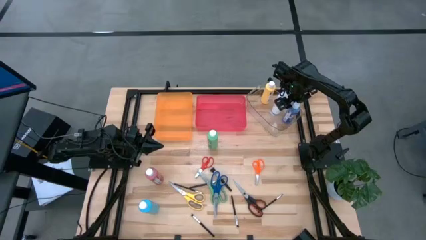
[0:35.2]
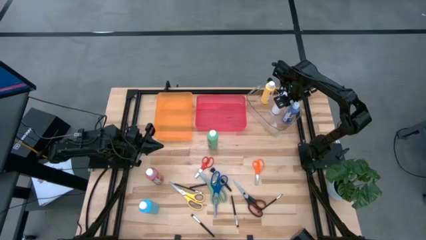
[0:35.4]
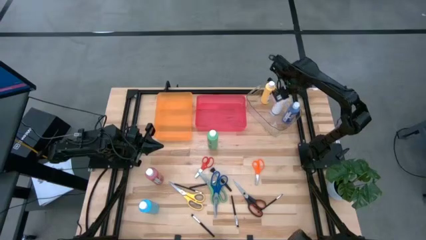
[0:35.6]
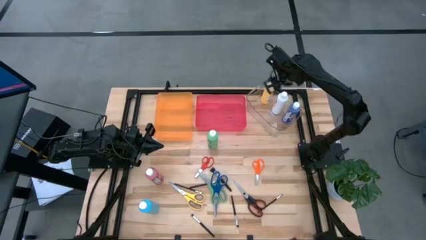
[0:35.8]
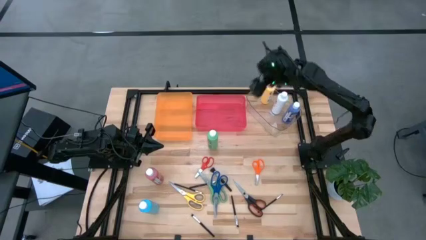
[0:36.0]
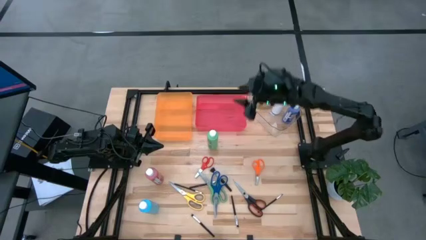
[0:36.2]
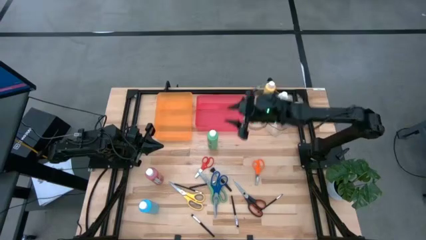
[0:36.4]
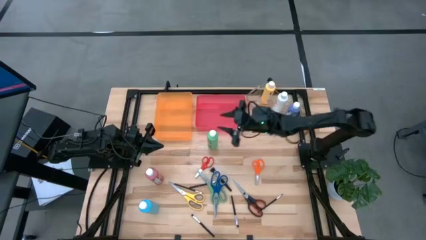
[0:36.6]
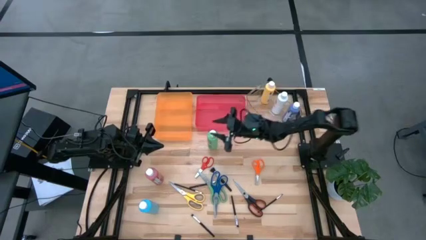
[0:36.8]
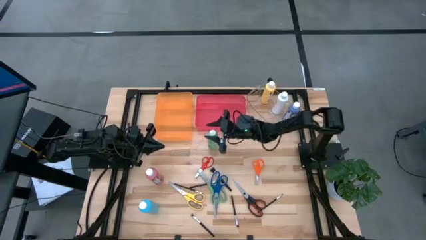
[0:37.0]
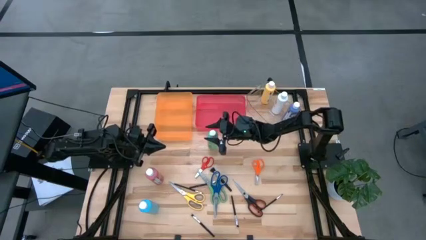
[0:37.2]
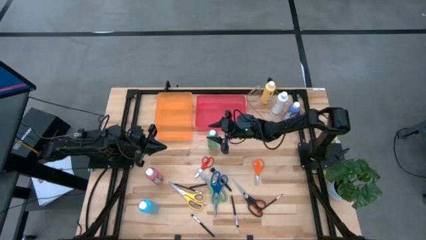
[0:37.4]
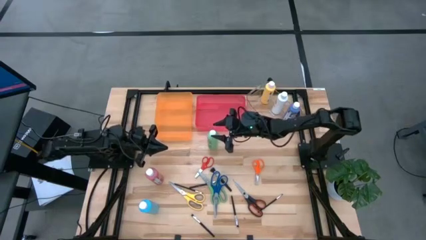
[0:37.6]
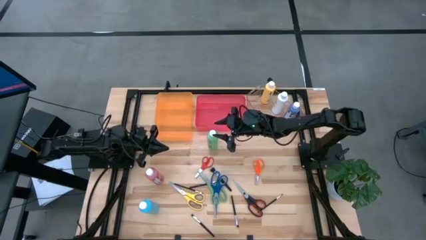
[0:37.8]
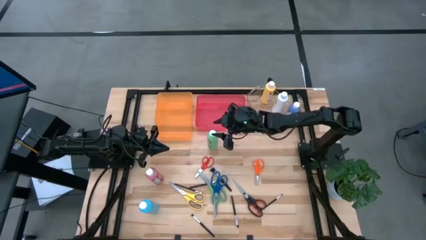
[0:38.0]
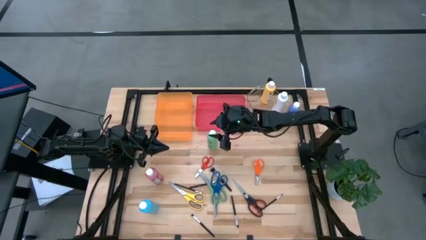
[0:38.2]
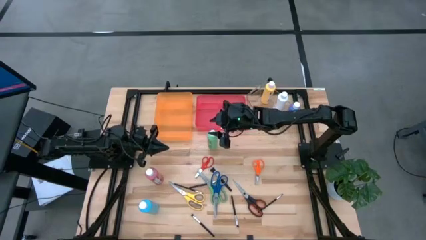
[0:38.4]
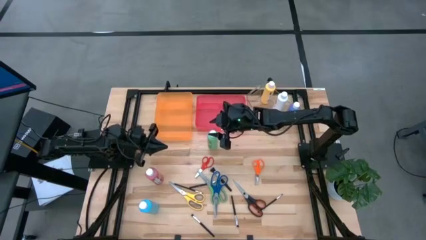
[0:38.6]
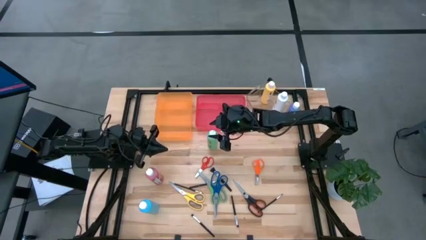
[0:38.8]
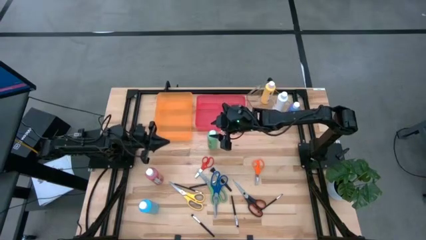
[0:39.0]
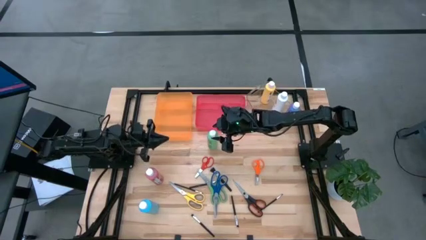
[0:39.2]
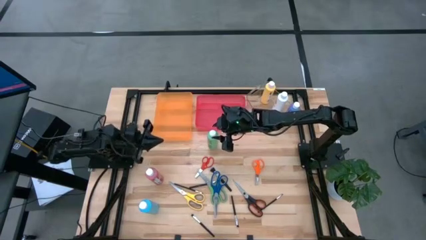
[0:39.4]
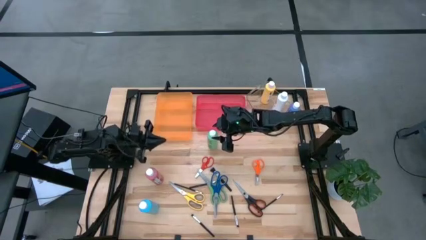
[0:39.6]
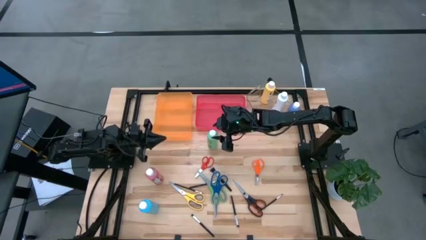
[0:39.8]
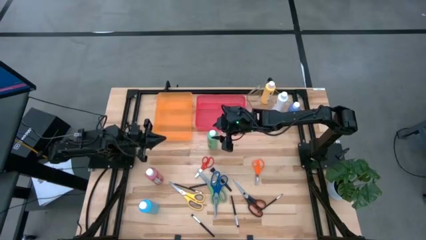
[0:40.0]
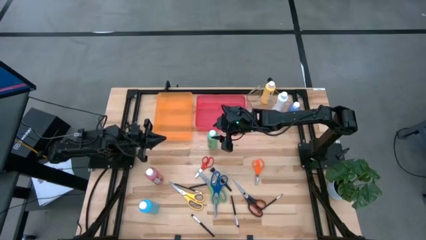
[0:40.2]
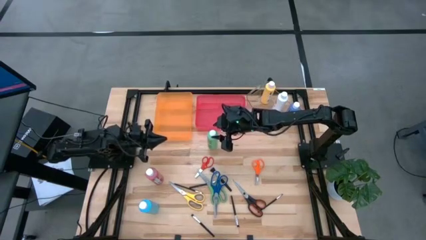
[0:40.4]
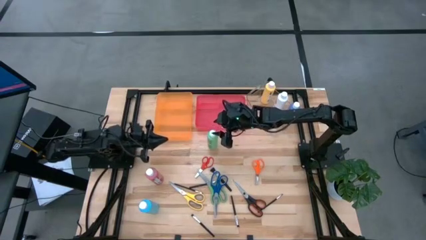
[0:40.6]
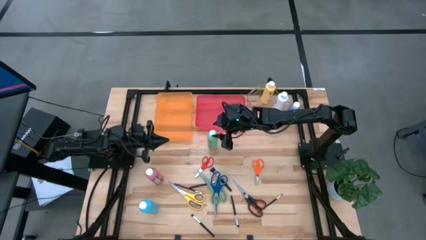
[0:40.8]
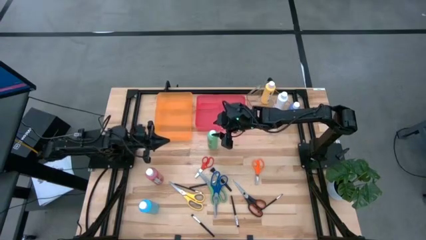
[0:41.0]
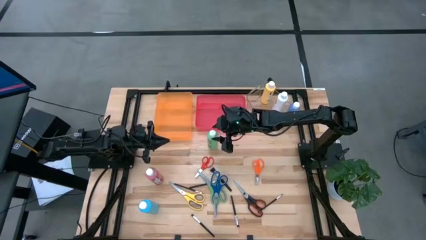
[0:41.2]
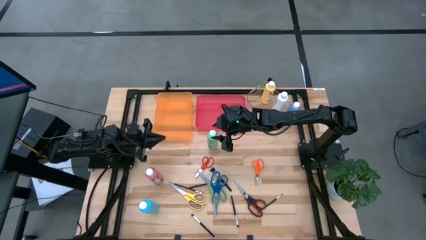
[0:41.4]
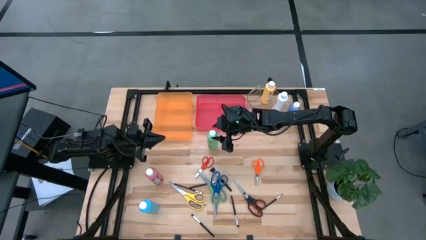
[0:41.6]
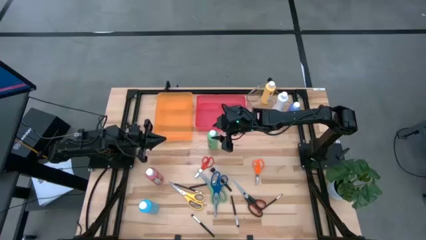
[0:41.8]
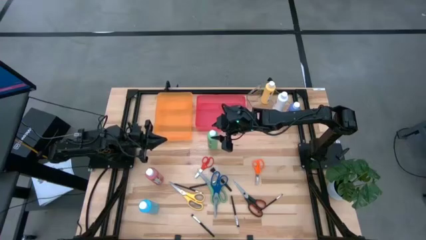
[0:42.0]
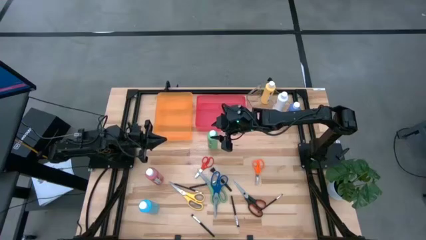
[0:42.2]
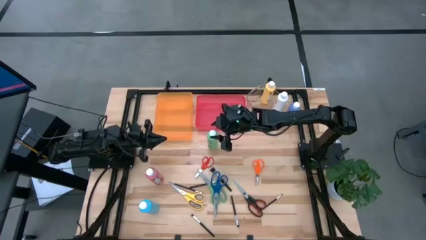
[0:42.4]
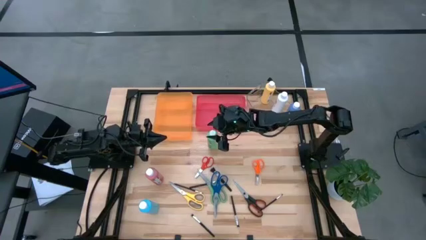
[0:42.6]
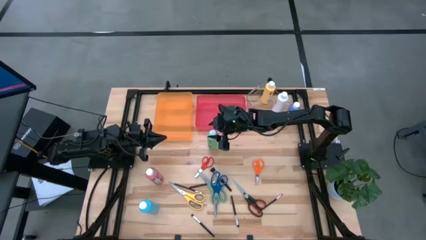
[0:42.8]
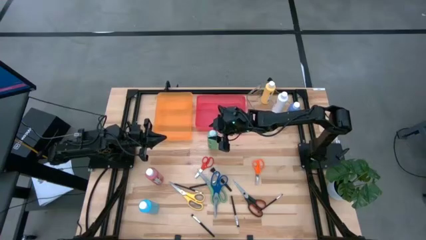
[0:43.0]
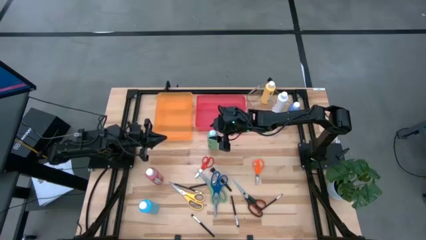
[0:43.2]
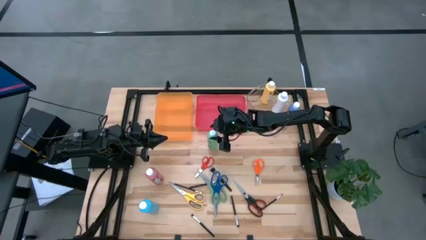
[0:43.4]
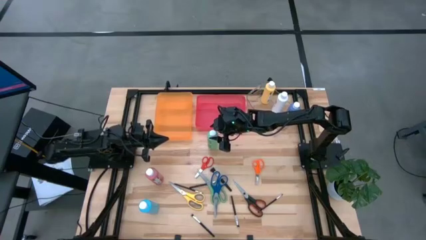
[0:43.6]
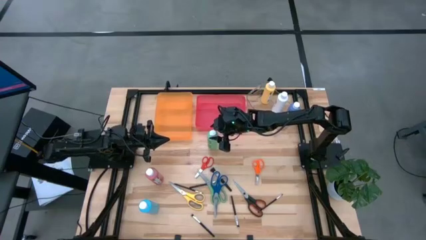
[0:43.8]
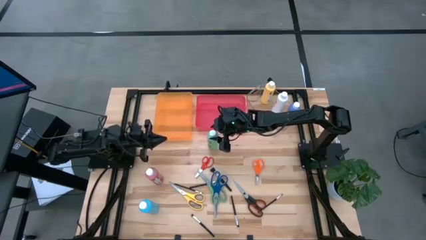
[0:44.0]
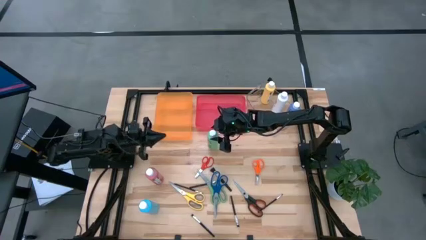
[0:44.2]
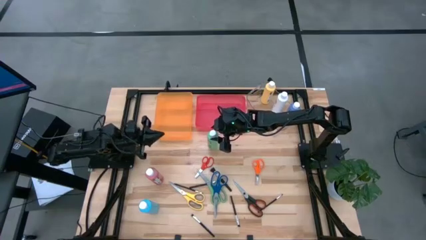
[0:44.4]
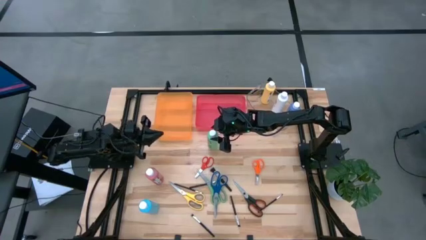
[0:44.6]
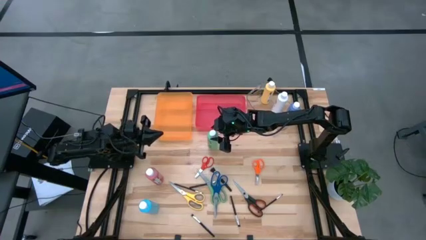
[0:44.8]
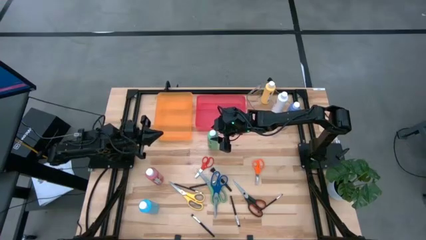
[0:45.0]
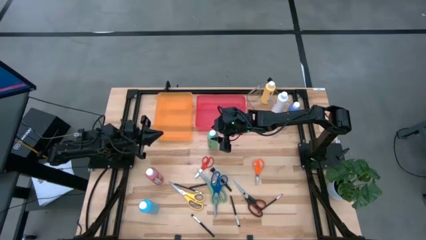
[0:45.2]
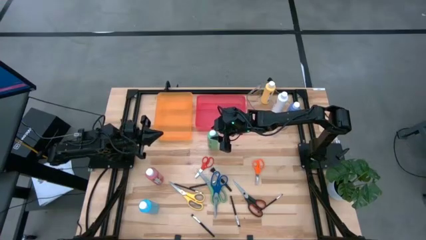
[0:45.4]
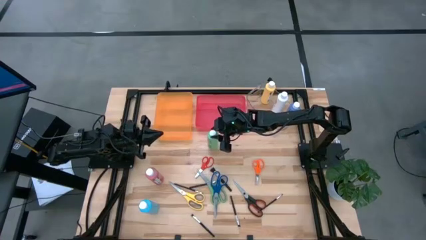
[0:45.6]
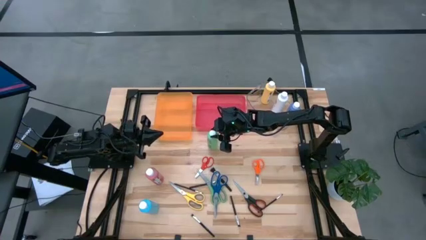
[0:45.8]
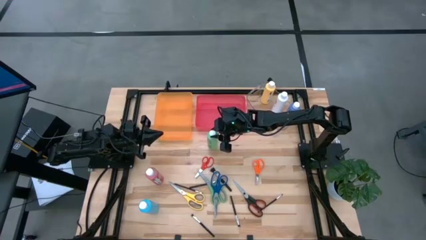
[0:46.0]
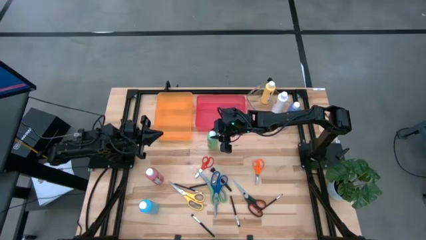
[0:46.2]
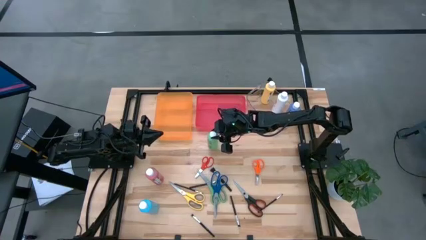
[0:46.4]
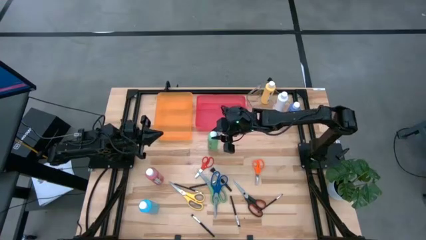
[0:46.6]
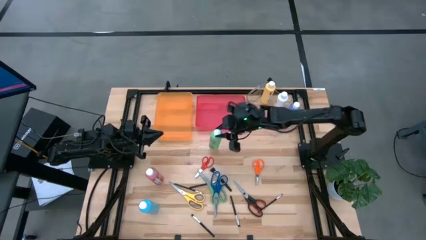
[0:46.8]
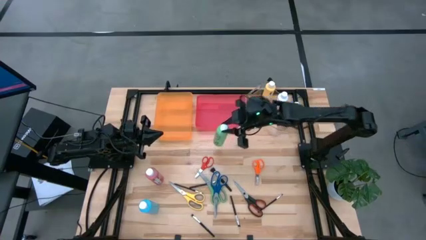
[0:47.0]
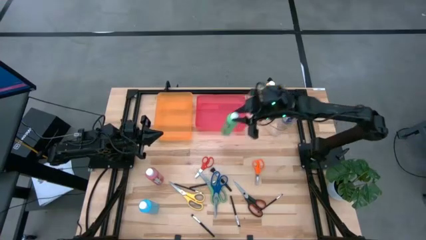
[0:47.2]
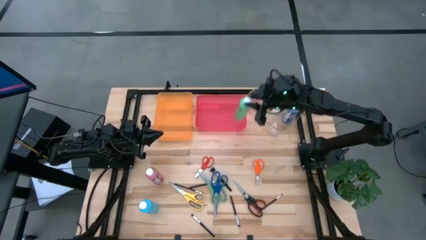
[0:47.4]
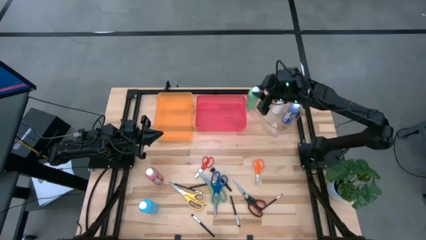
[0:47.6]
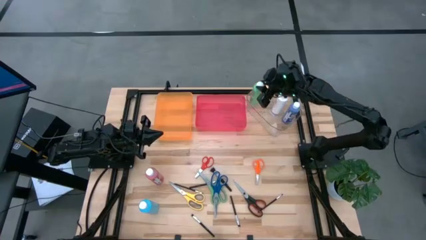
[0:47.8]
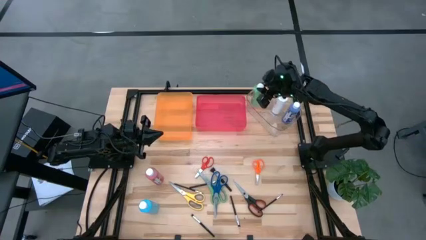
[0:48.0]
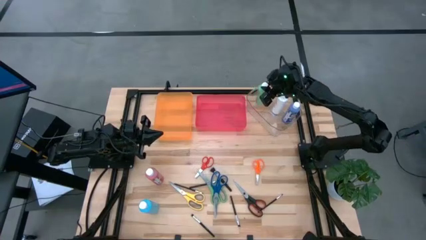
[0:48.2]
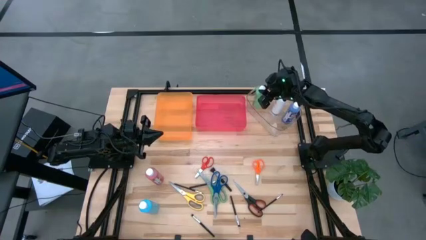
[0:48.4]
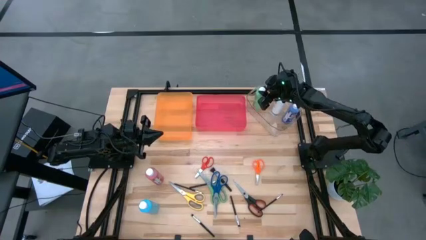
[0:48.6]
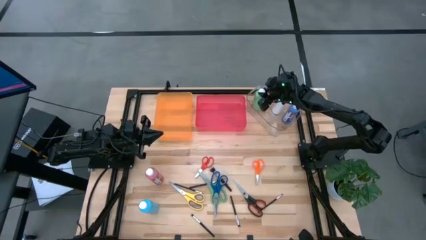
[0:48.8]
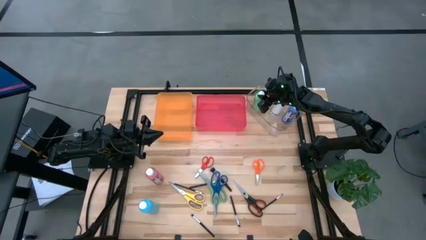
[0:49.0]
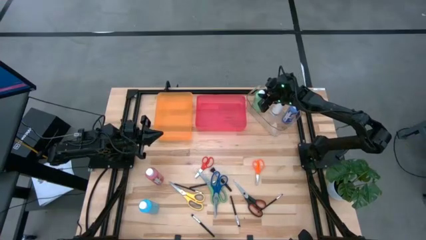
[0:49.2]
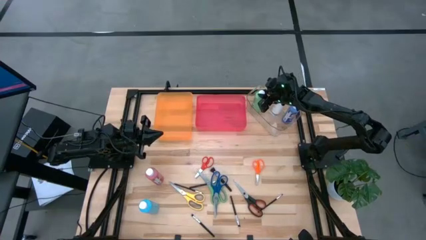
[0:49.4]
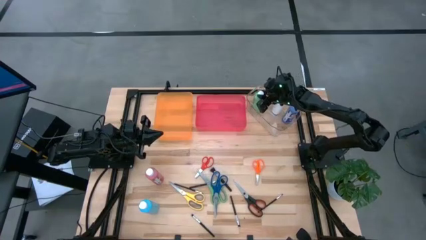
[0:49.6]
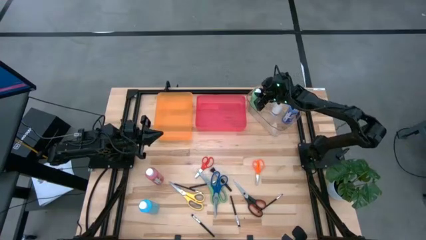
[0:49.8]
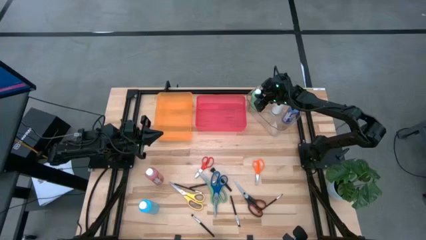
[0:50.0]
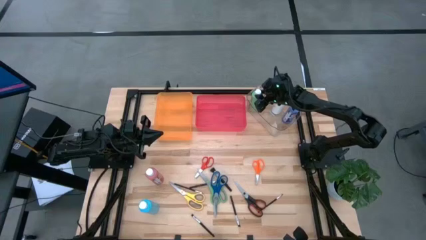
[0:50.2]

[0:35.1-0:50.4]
Task: Pick & Place Paint Supplies
Put the green paint bottle into the transparent bin
